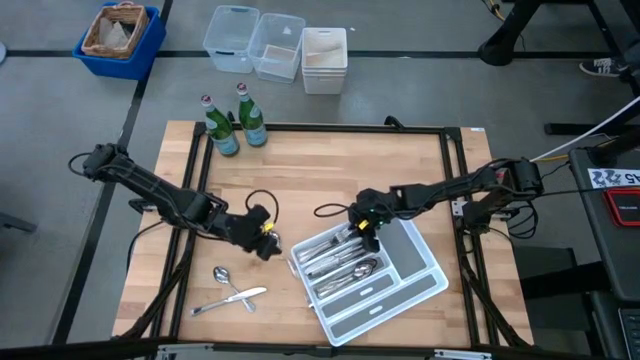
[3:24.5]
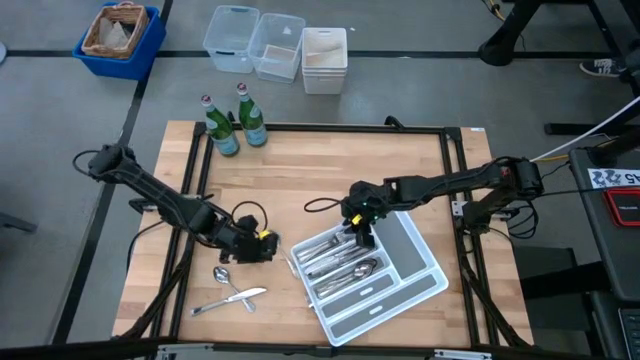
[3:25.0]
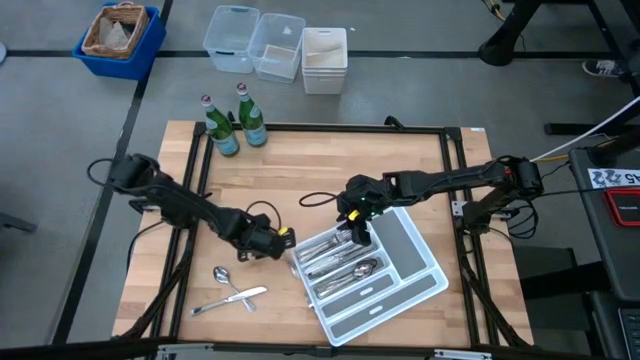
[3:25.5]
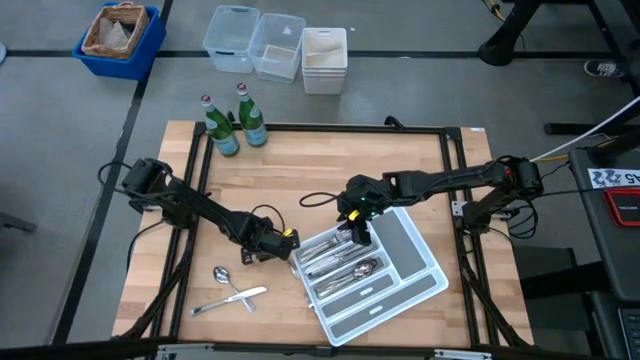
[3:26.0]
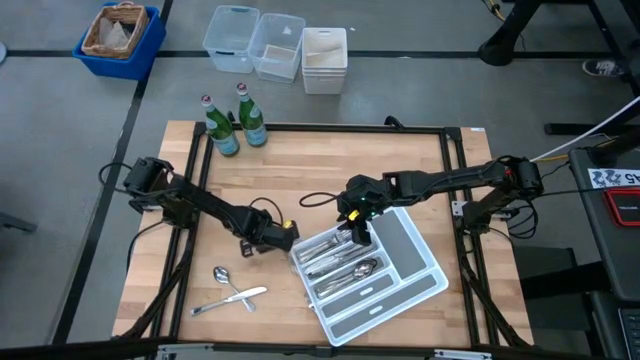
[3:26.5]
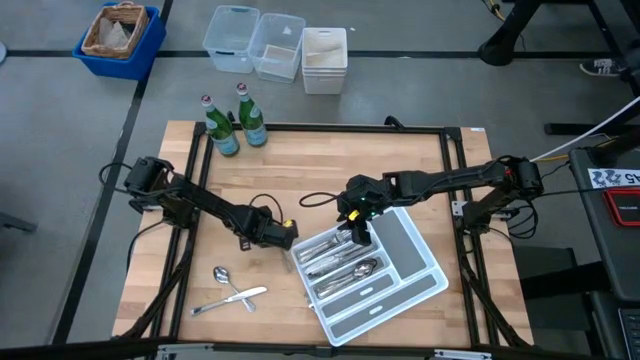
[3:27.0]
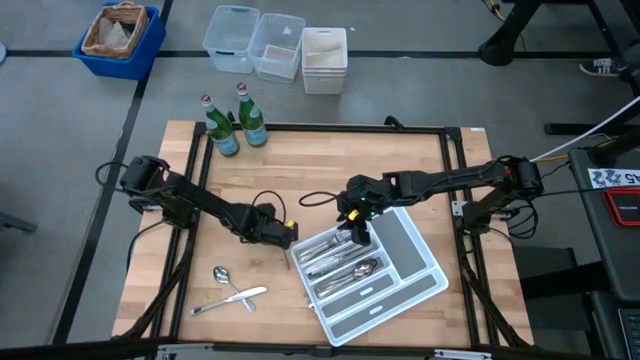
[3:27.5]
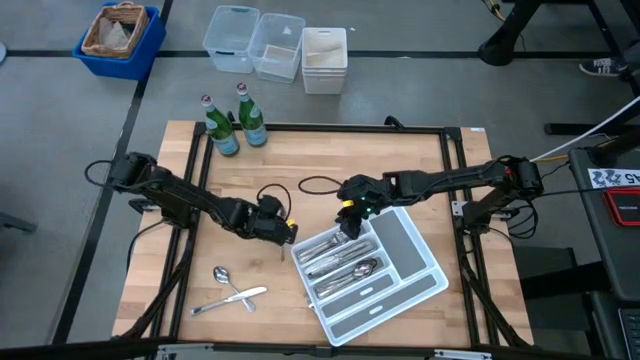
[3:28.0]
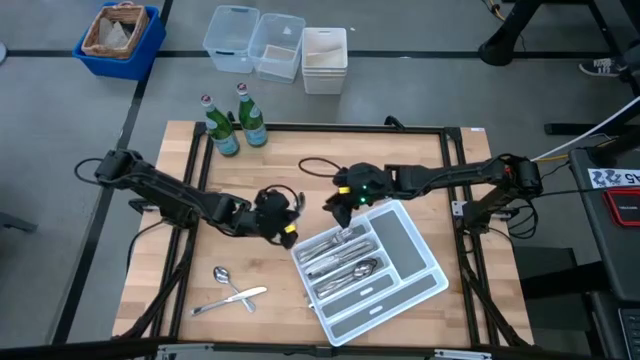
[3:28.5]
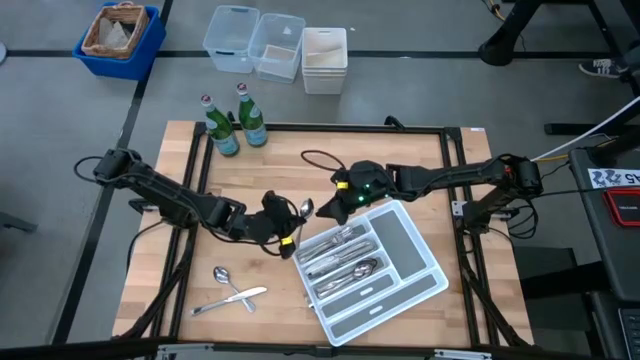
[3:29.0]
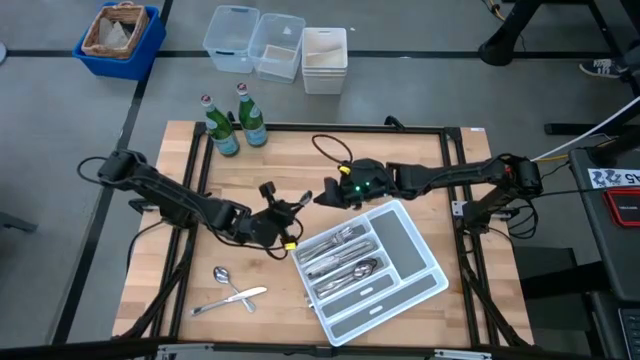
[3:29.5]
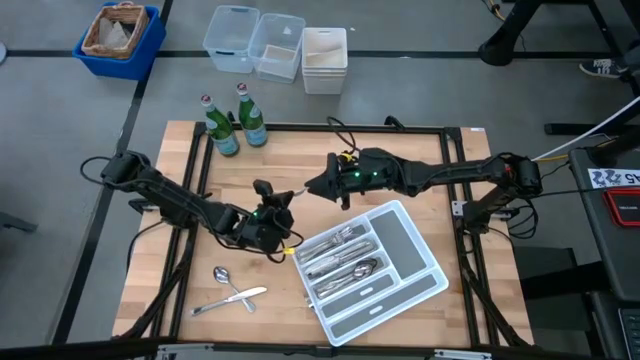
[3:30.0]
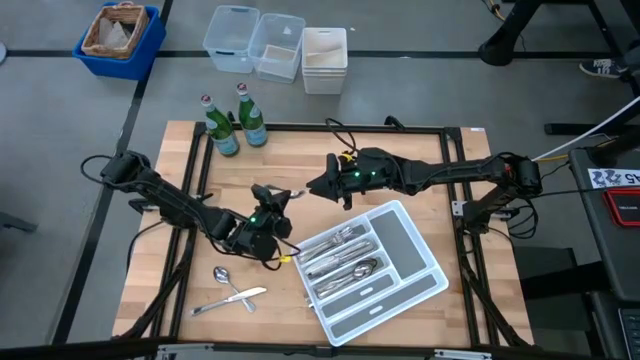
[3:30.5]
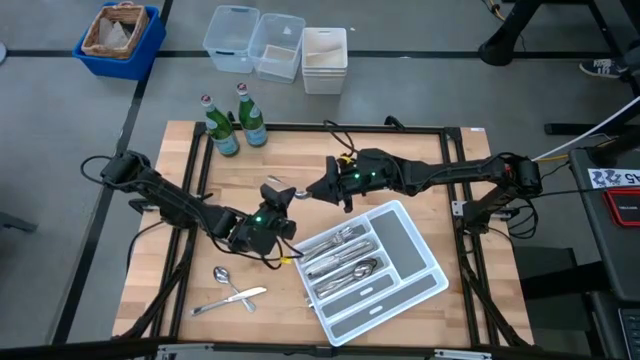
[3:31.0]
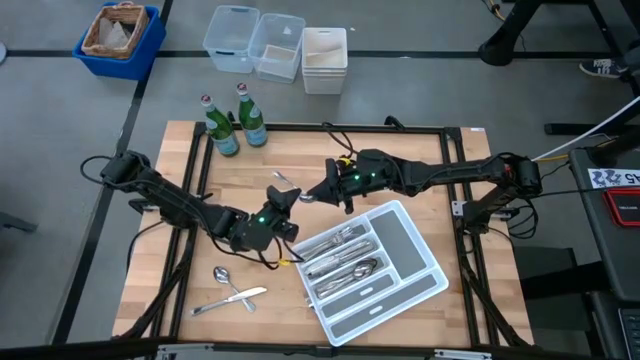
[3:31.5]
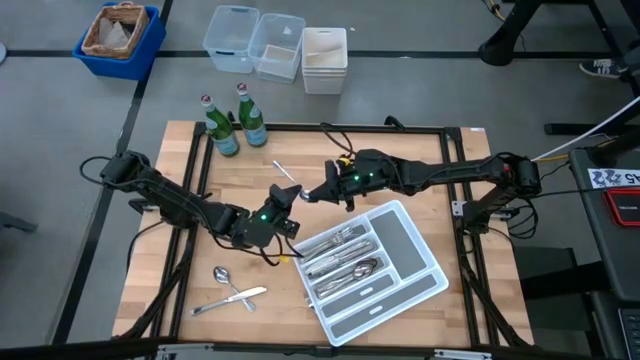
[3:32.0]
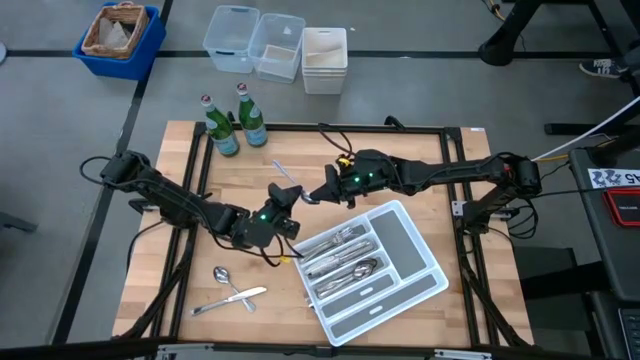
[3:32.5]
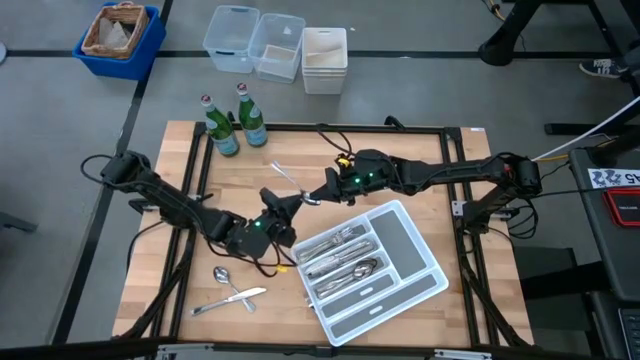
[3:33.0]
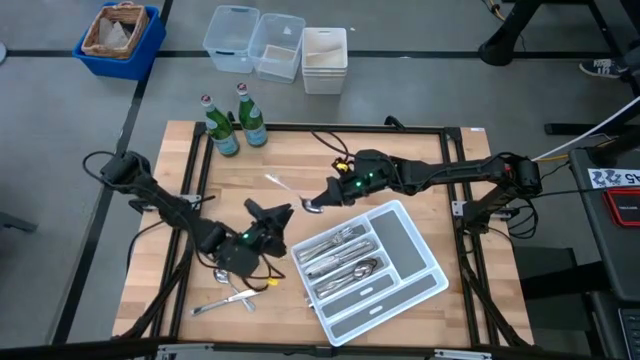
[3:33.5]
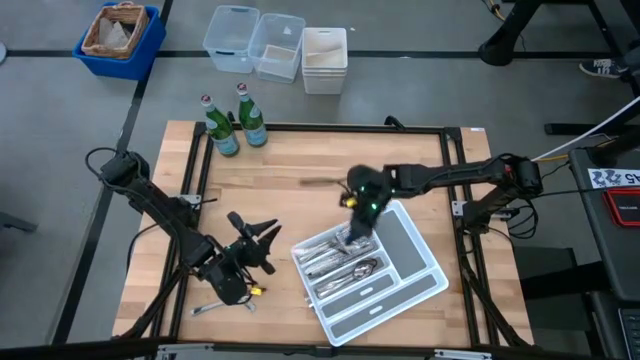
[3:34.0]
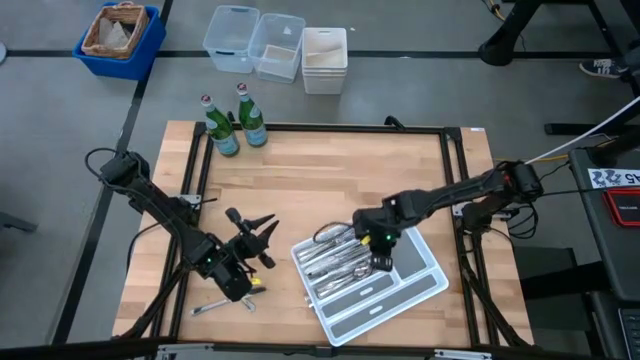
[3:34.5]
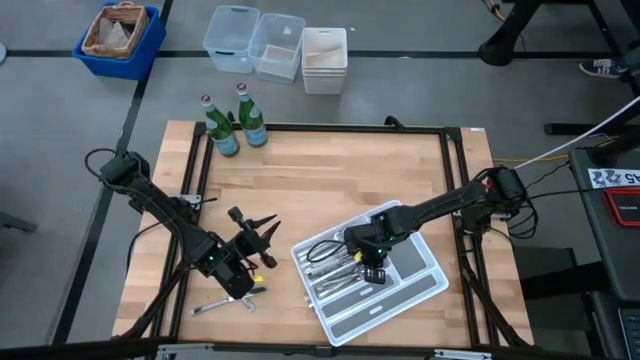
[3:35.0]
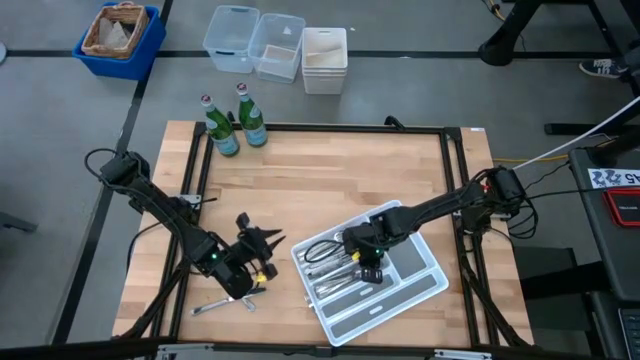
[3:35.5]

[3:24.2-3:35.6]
Task: Sort silverware
Put the silver spoon into the white silverware tray

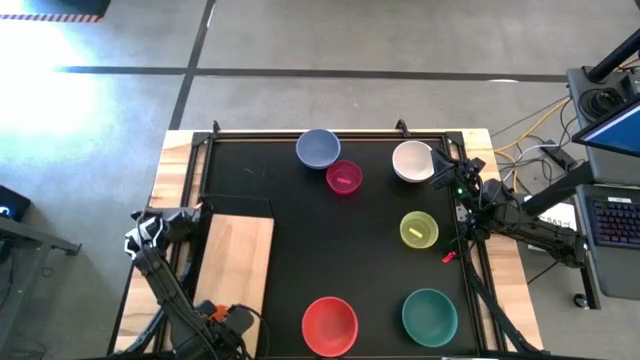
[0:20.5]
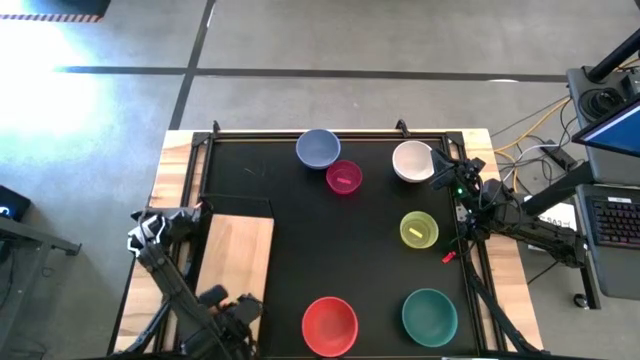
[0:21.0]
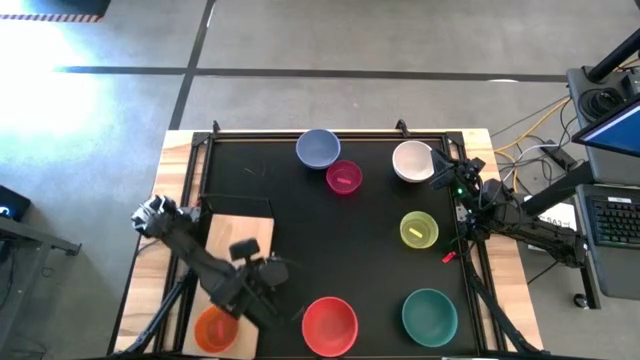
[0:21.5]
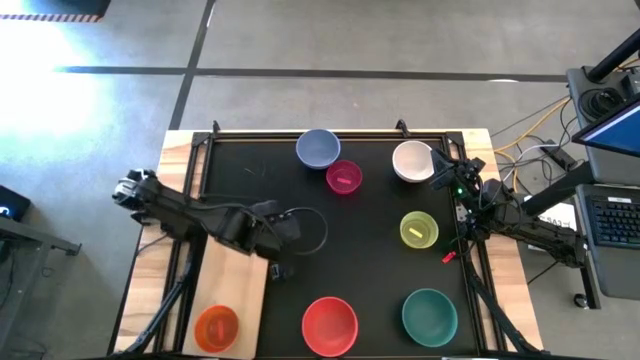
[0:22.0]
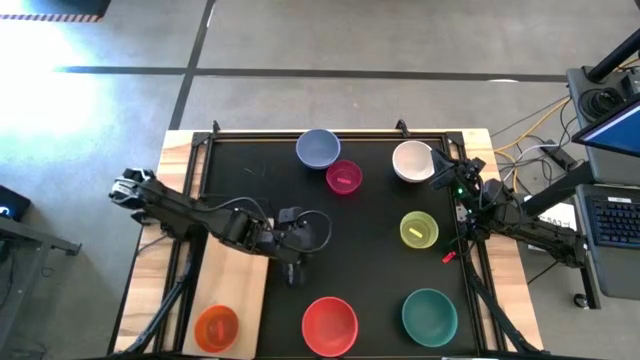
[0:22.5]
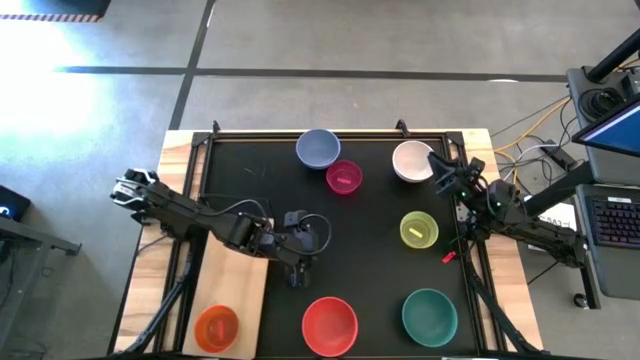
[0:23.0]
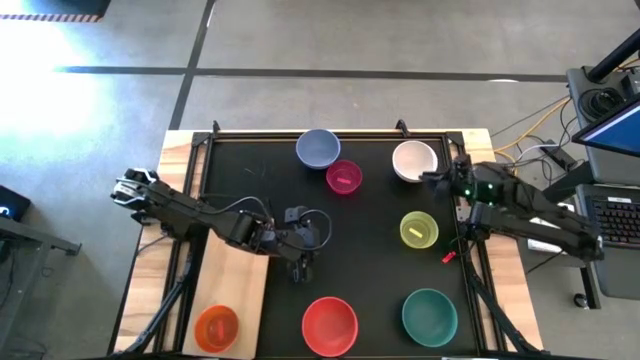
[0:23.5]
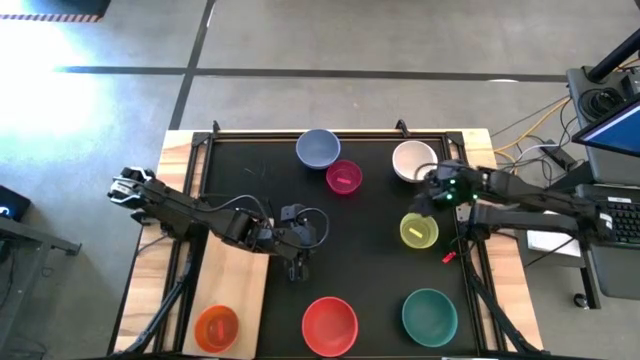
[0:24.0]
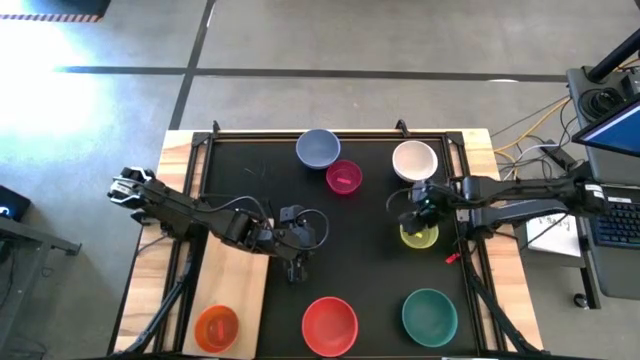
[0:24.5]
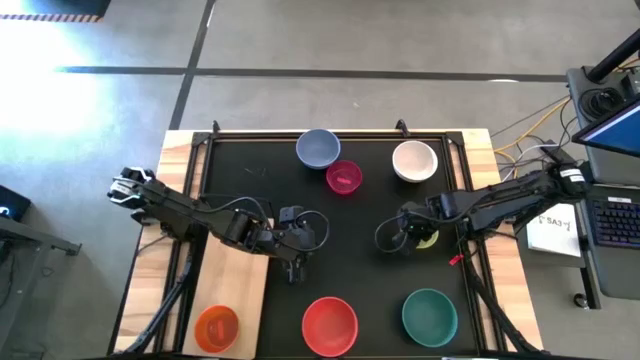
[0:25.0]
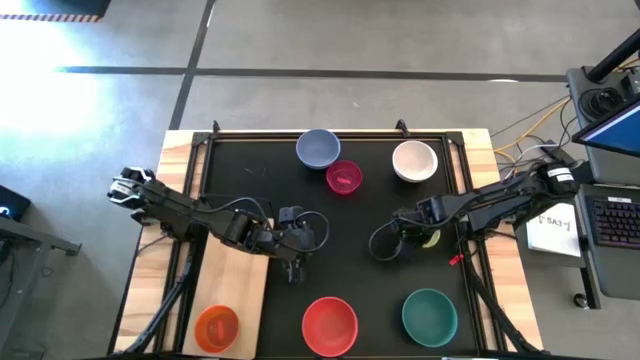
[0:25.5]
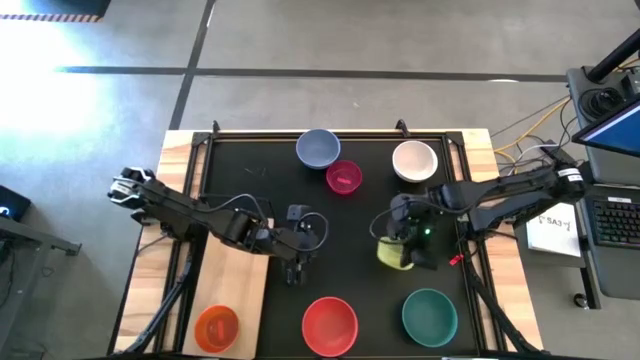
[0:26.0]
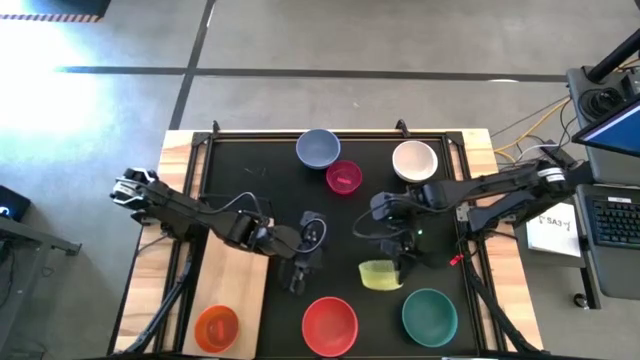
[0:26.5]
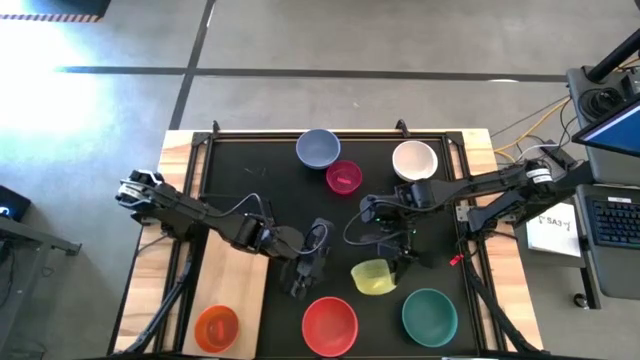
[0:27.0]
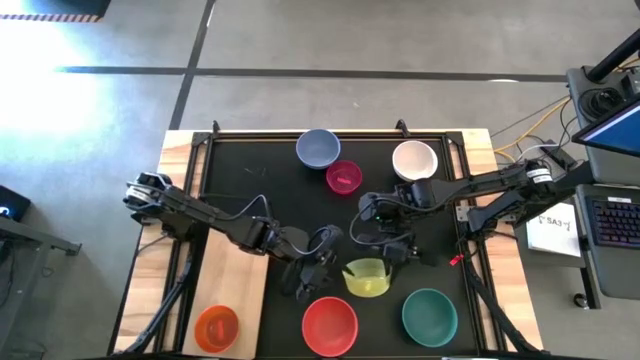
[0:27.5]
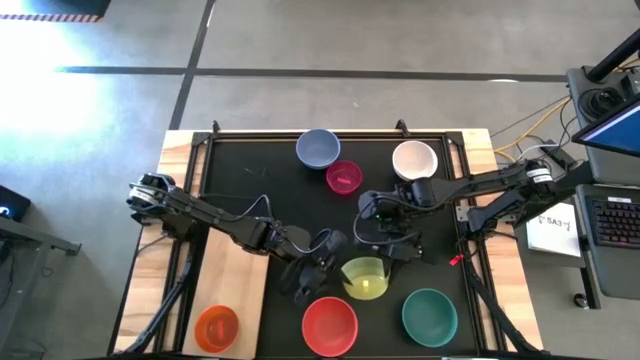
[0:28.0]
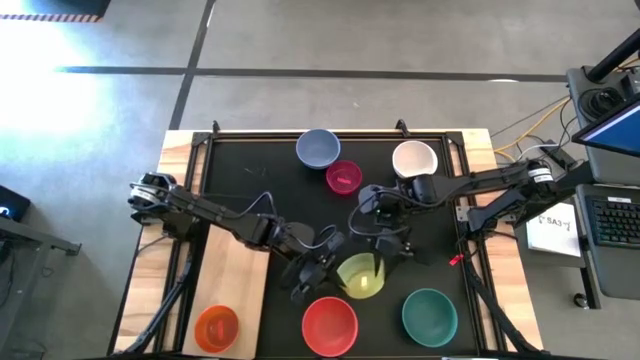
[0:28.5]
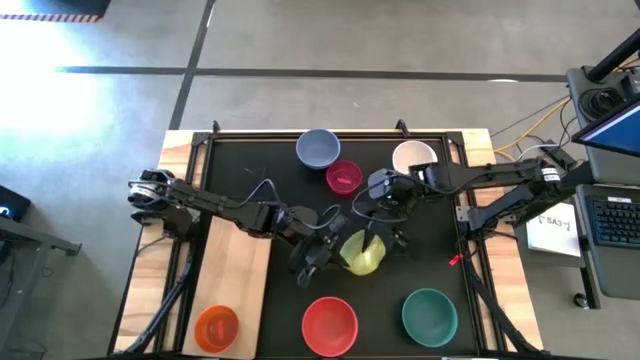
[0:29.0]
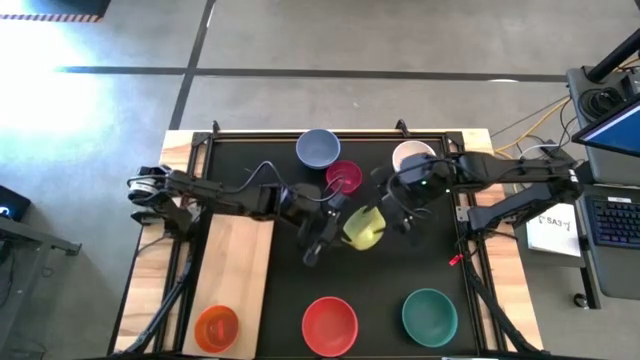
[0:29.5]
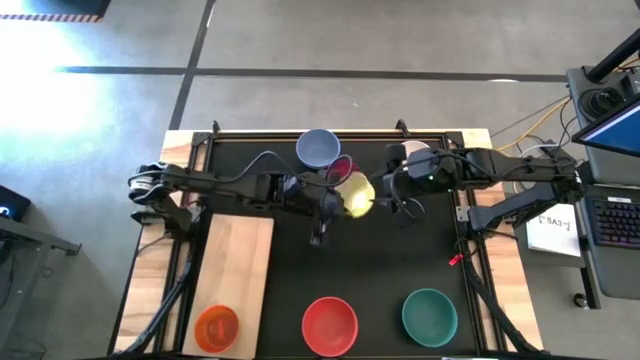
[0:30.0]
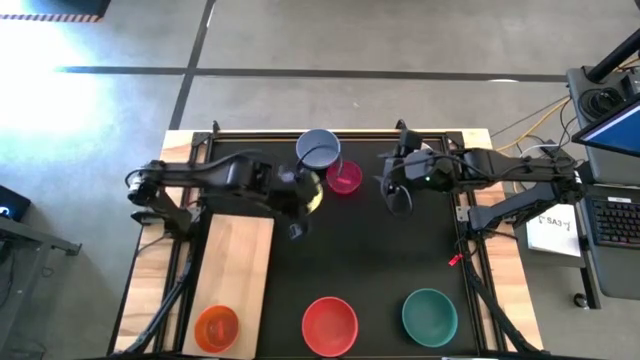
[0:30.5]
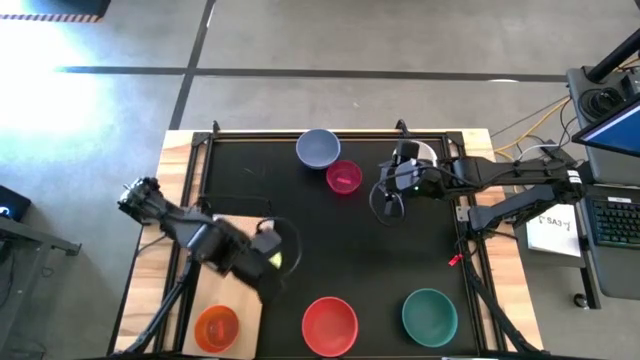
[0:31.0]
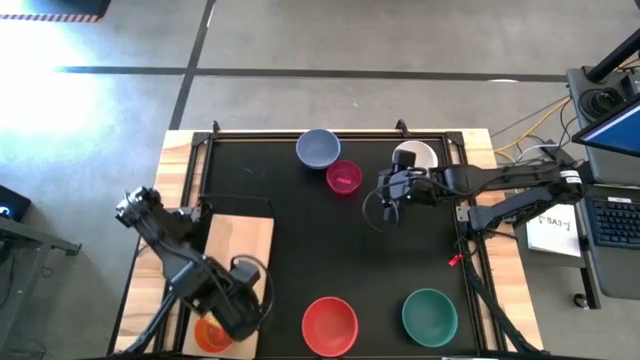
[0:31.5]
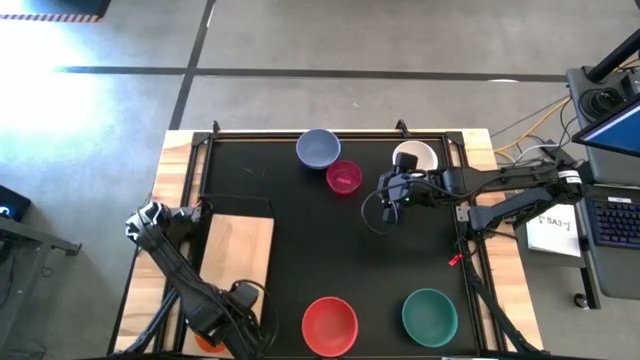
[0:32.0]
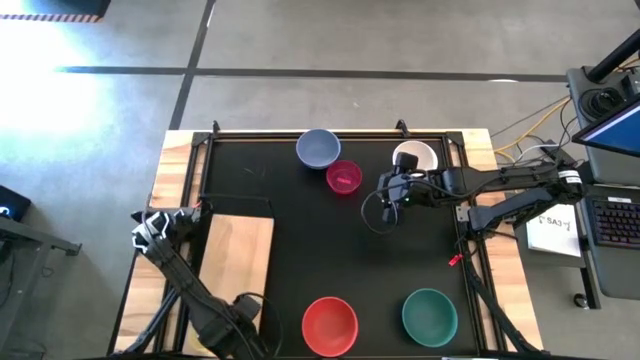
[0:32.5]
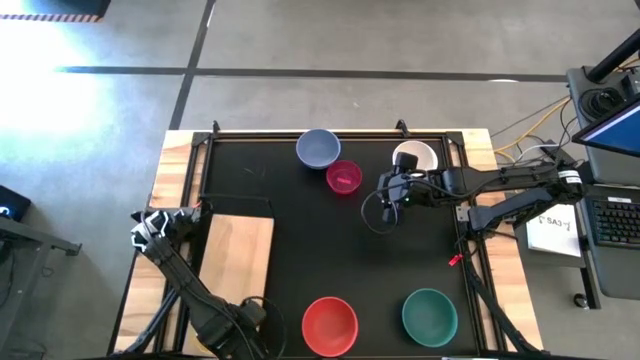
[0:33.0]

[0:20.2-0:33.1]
Task: Place and stack bowls onto a shelf
Stack the yellow bowl on the light orange bowl on the shelf
